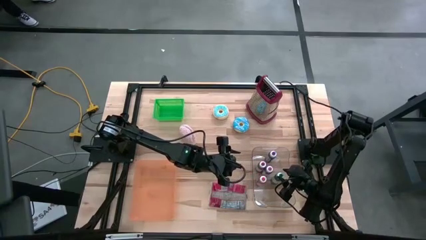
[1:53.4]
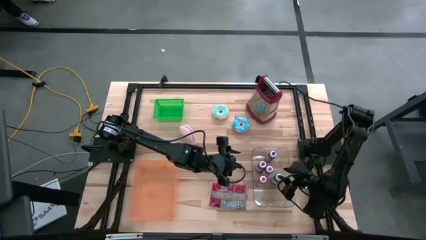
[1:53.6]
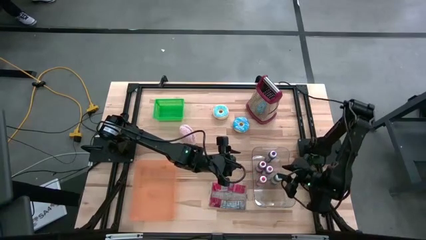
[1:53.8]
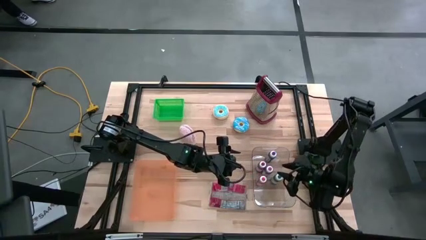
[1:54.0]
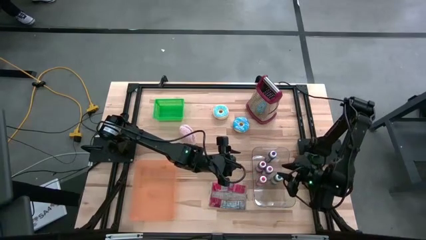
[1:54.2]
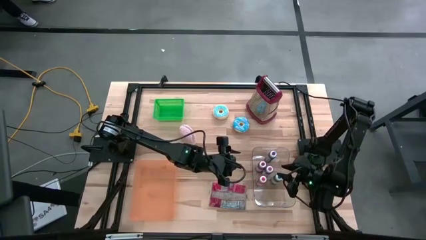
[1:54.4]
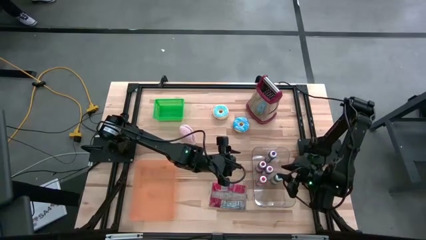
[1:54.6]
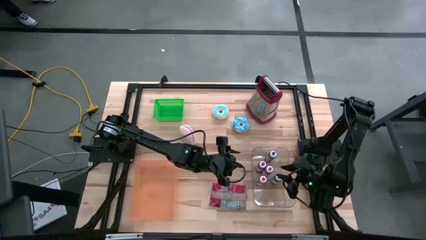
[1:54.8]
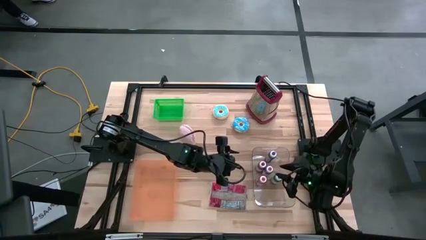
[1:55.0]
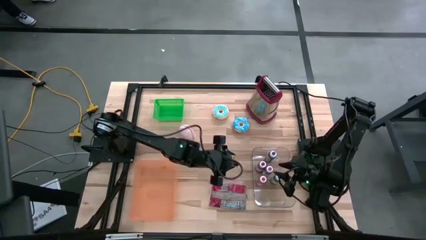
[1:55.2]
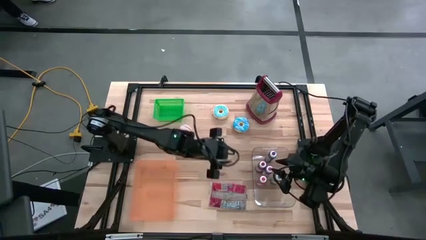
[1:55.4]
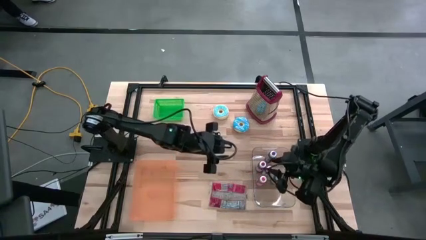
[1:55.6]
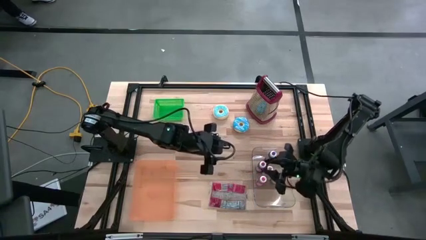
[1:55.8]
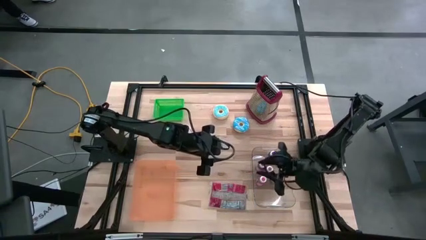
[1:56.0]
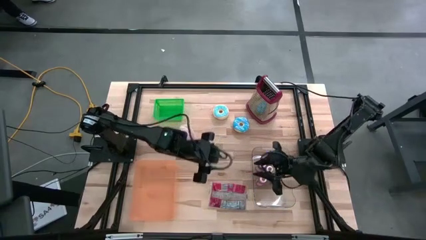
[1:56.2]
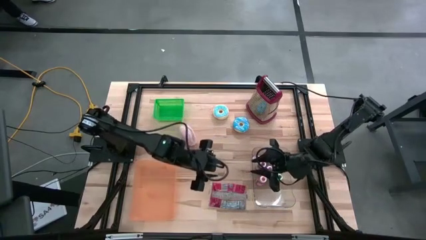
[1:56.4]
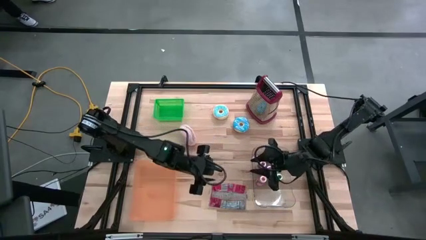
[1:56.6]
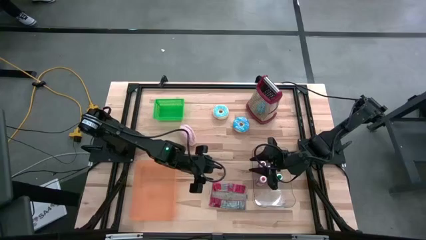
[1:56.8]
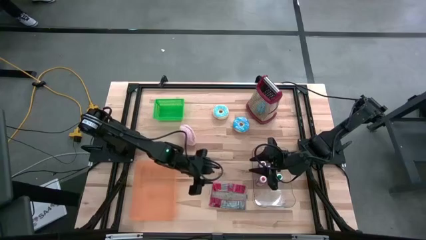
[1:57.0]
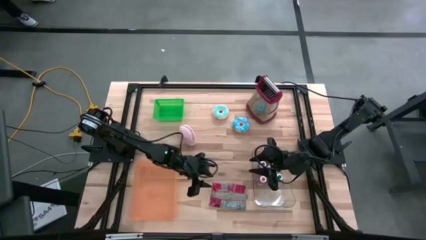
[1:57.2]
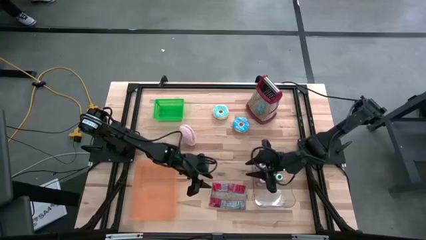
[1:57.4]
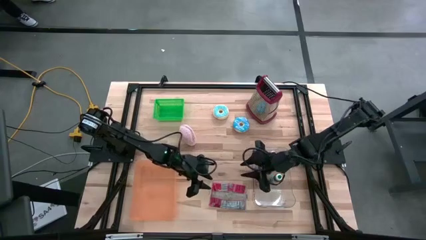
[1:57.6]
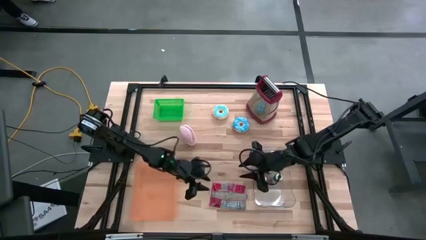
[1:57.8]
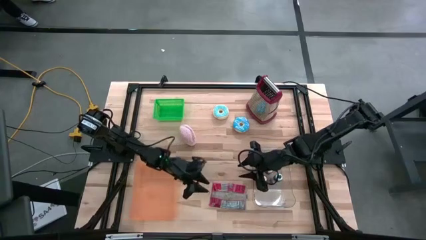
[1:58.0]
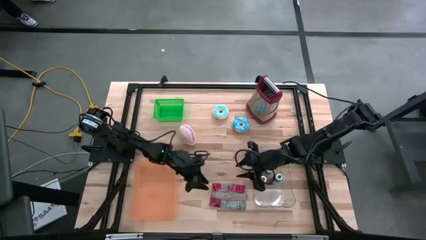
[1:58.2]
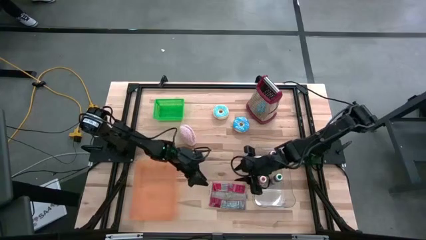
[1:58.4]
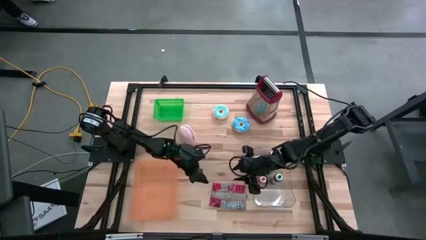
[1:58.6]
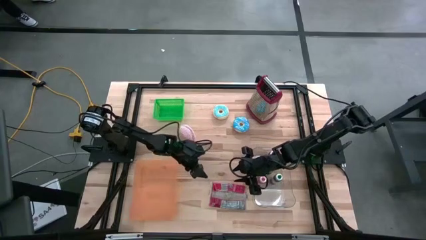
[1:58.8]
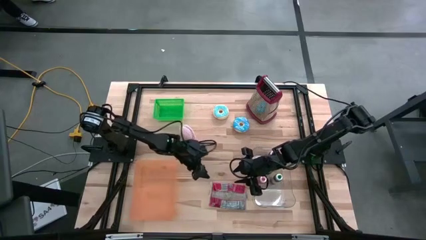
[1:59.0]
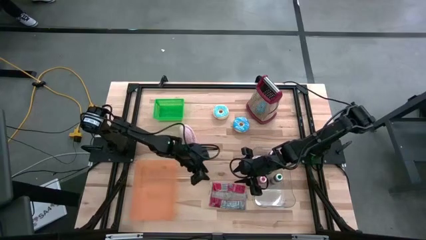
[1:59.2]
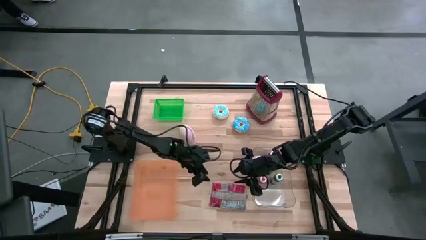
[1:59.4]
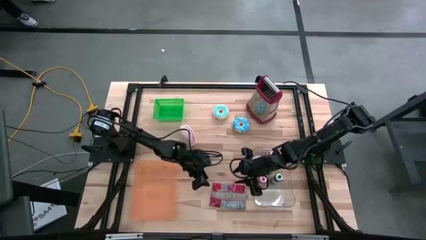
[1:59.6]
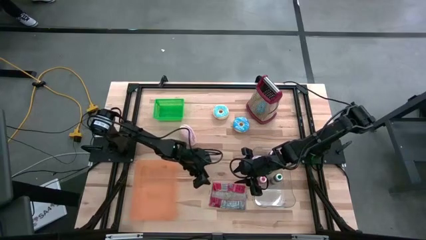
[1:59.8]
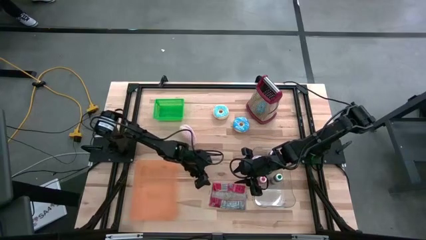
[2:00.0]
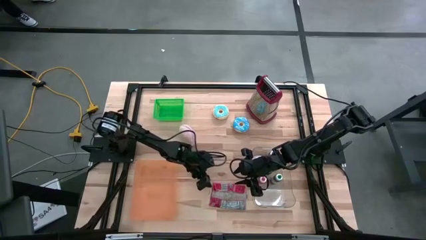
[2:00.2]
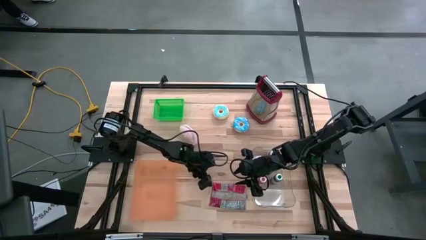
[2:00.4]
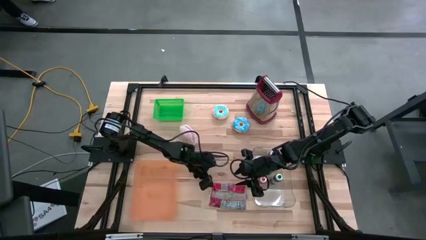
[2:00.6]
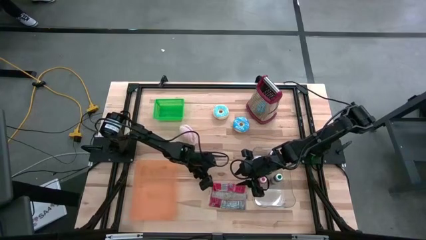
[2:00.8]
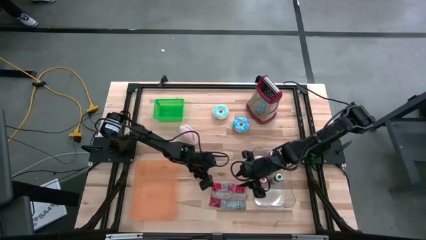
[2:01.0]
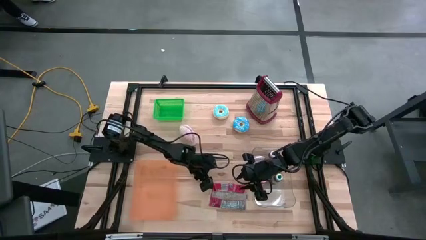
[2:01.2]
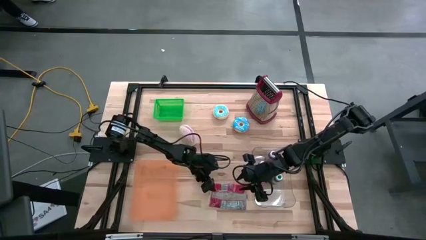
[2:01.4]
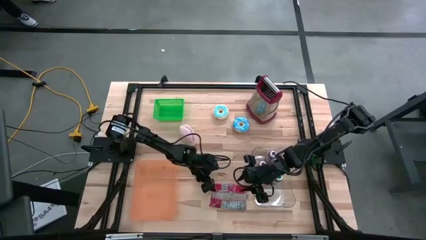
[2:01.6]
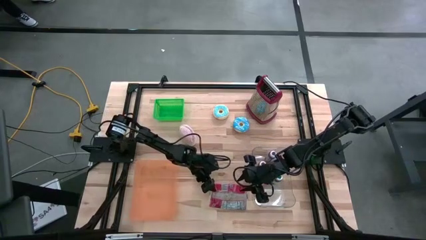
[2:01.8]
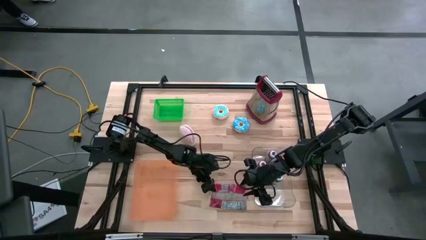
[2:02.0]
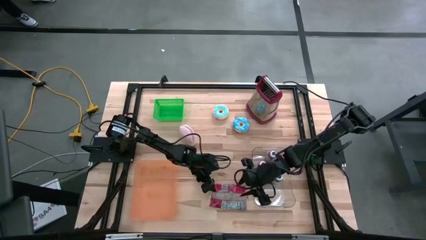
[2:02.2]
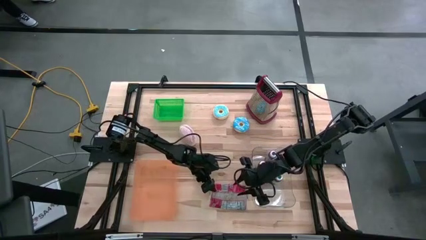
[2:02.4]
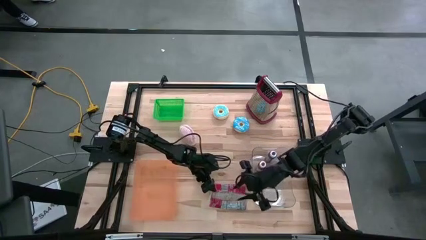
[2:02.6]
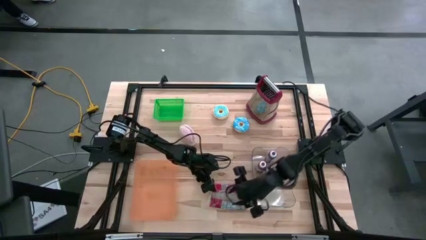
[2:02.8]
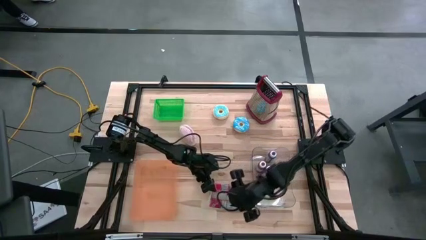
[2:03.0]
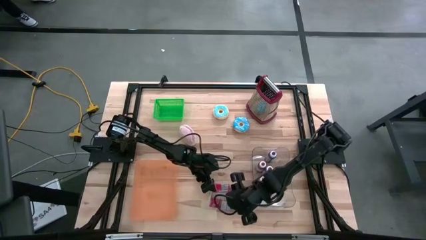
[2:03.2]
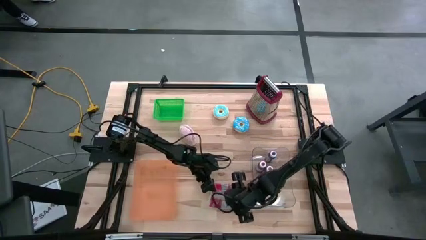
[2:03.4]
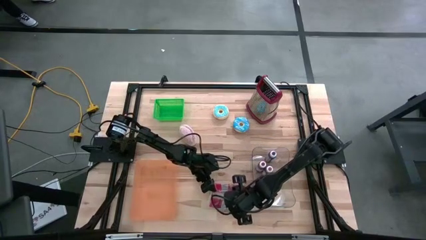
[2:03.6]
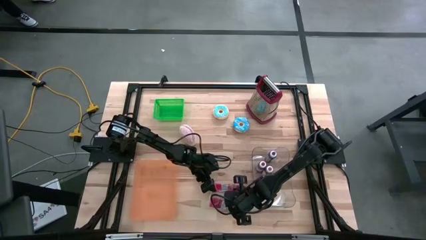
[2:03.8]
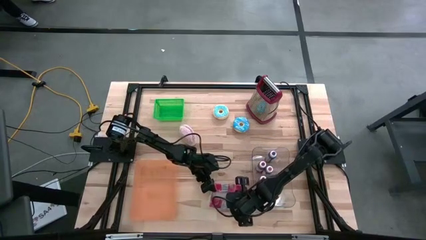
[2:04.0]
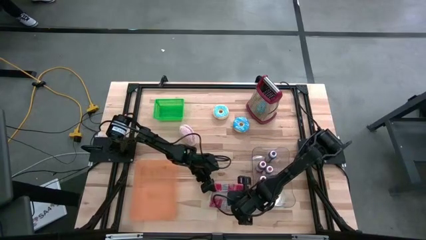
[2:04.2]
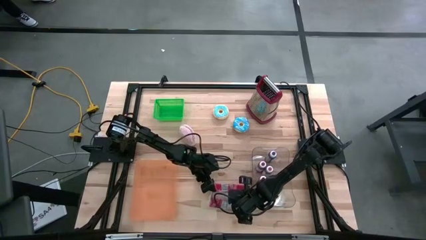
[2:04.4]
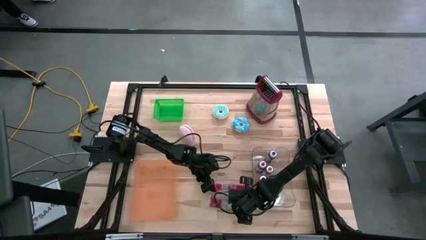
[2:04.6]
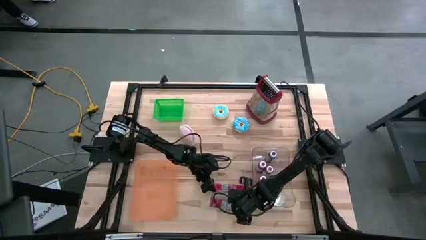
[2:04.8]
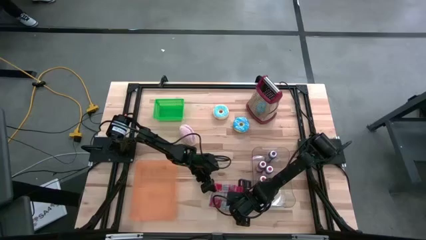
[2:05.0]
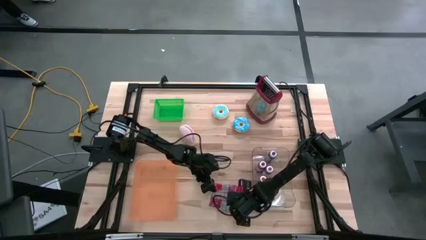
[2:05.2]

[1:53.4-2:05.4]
Put the red popcorn bag into the orange bin

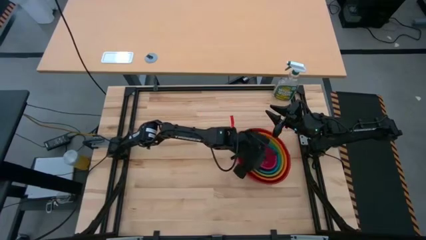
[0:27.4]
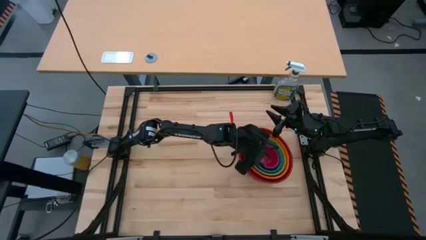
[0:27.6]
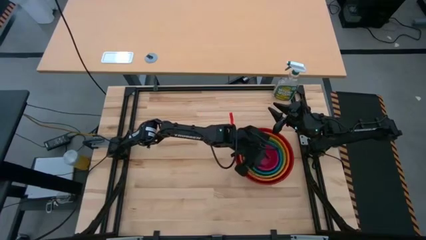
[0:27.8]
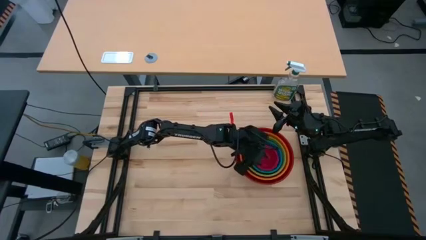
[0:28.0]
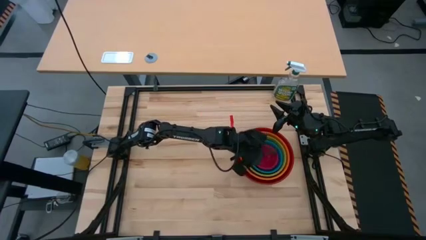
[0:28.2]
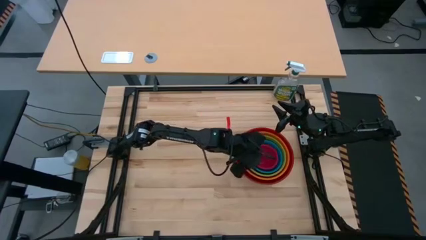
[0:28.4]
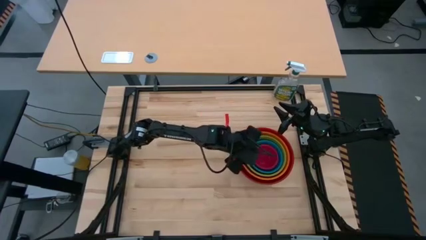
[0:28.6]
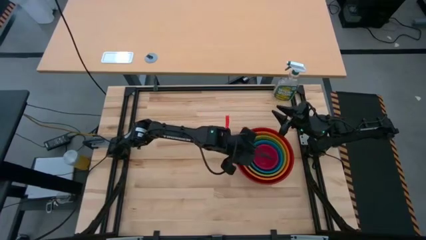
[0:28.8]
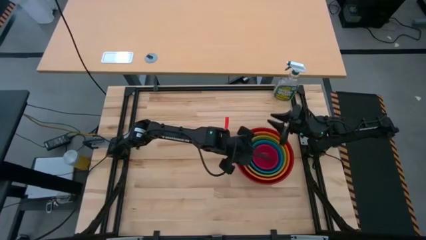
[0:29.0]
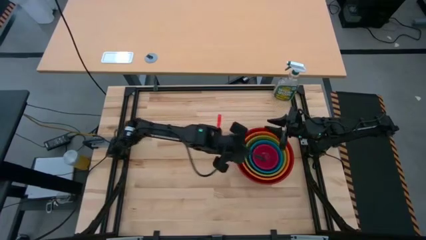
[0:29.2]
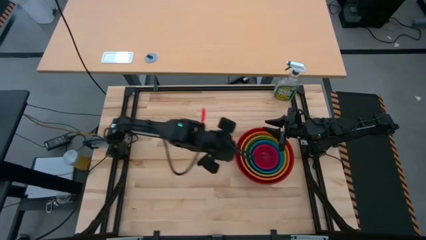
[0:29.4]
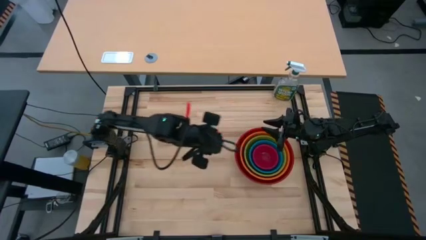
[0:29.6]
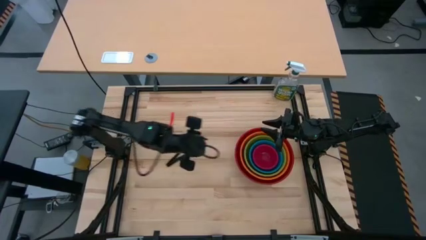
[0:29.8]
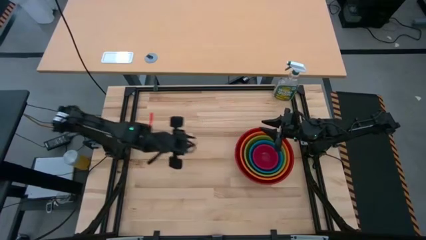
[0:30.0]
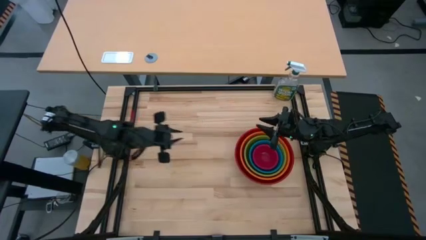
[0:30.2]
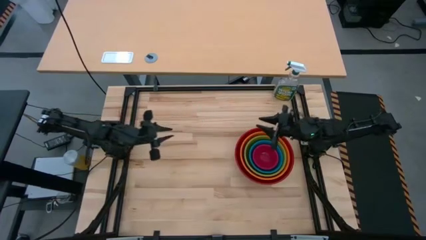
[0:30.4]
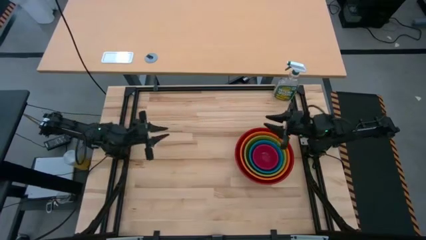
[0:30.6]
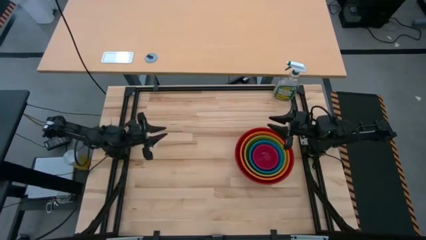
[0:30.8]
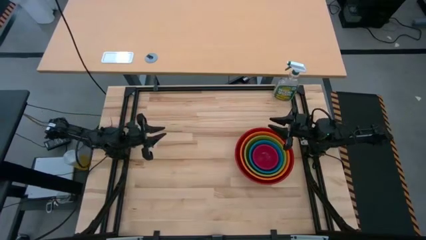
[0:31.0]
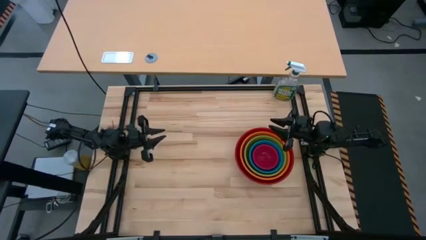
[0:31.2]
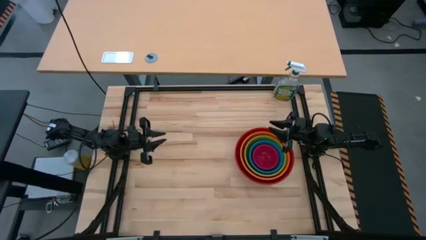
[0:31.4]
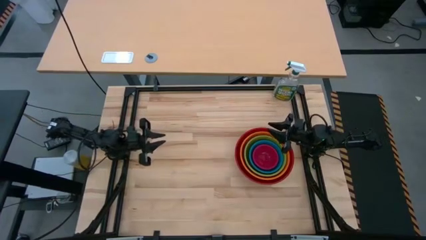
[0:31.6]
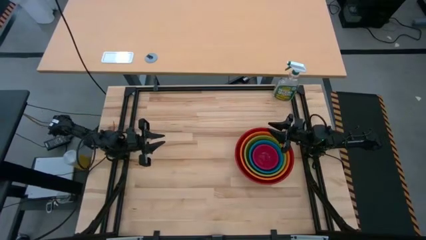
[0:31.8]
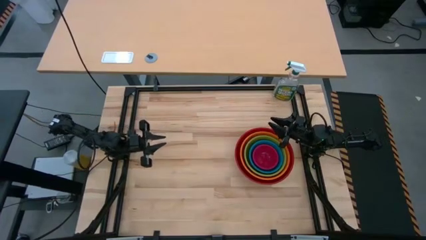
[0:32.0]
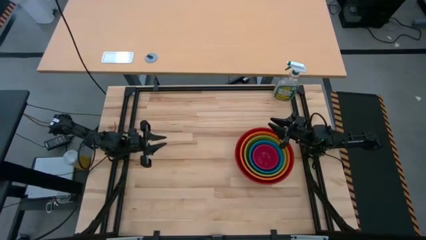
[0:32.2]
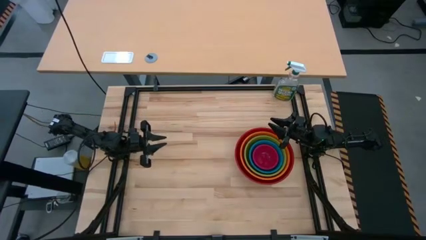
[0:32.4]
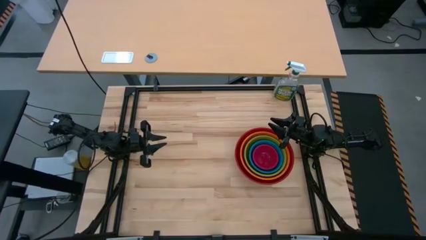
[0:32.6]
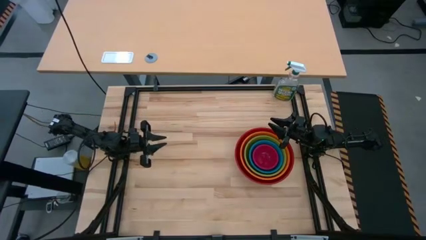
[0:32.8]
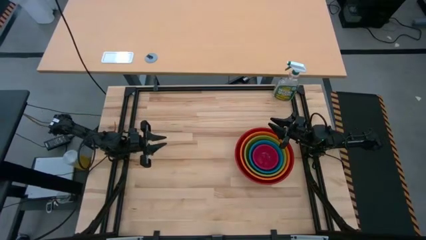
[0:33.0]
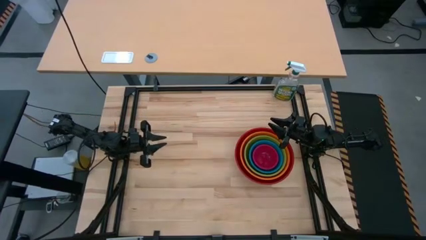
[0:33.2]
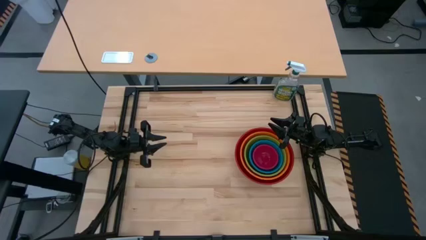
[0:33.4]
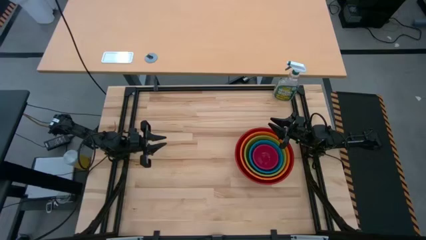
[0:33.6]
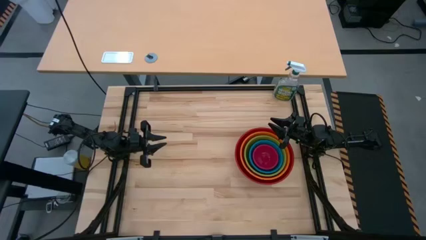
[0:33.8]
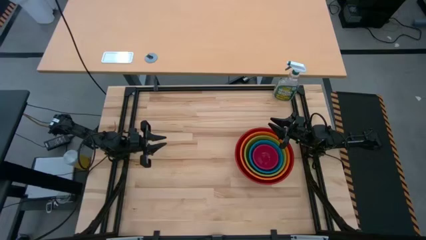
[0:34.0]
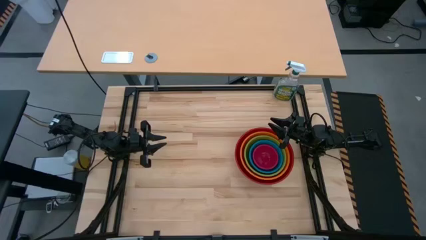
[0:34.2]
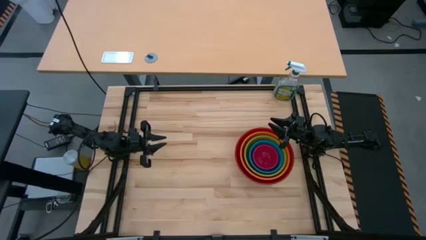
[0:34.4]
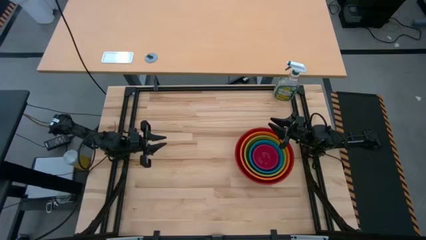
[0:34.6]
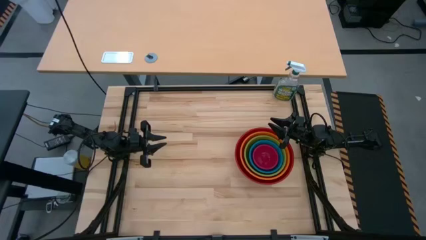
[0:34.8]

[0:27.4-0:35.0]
Return to Home Position
